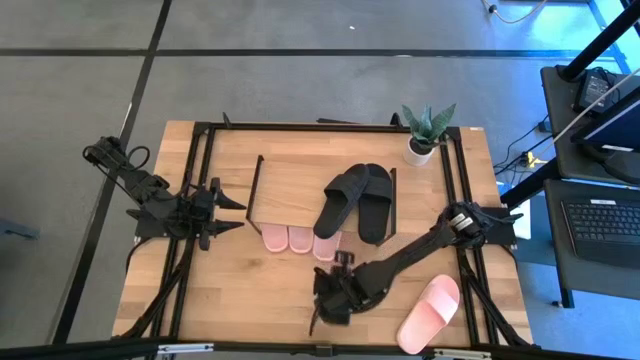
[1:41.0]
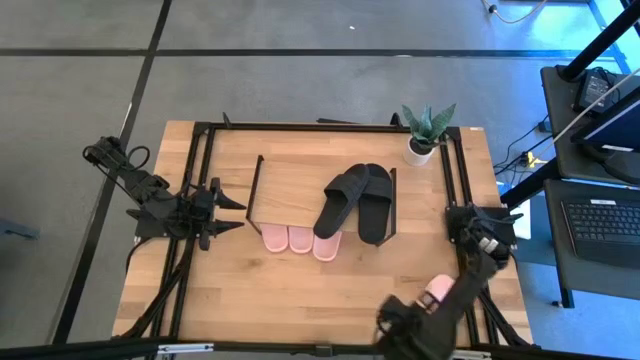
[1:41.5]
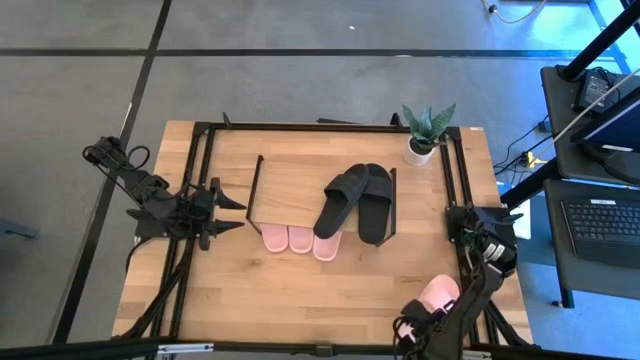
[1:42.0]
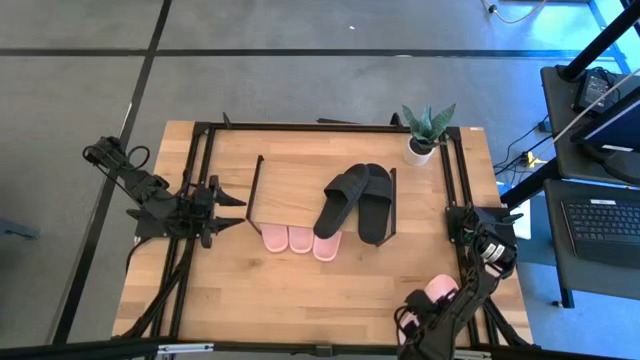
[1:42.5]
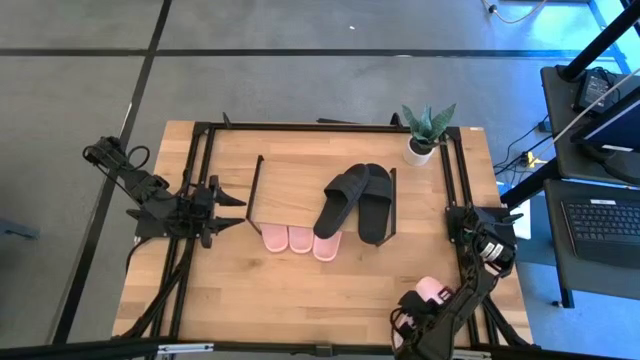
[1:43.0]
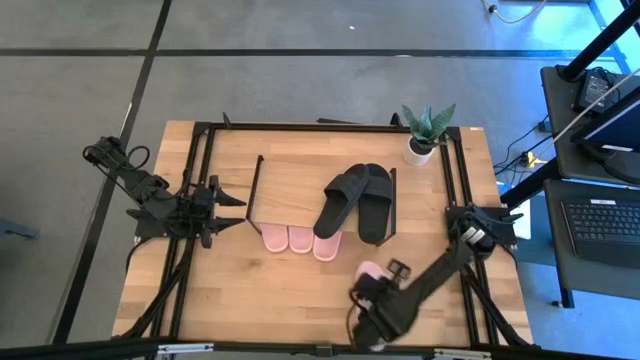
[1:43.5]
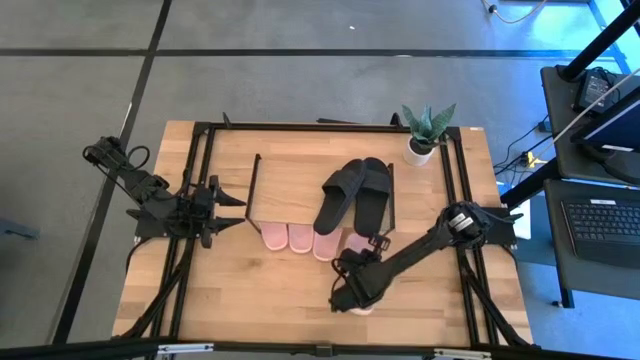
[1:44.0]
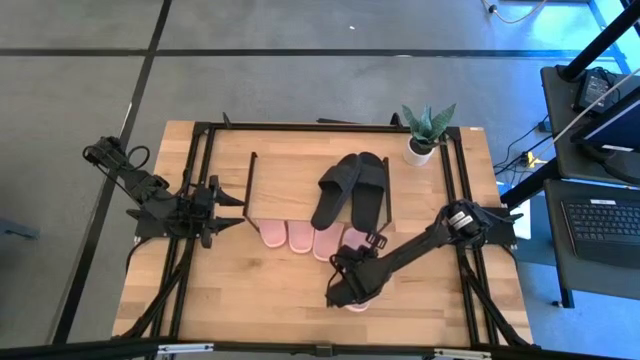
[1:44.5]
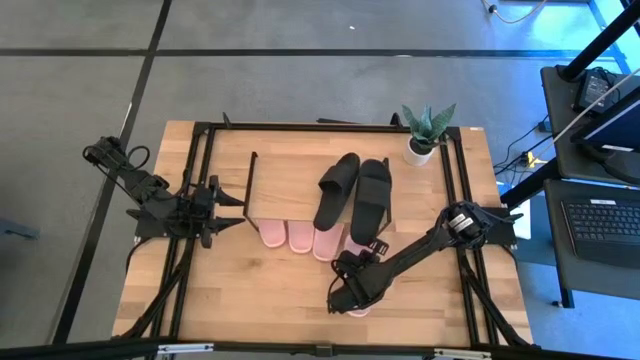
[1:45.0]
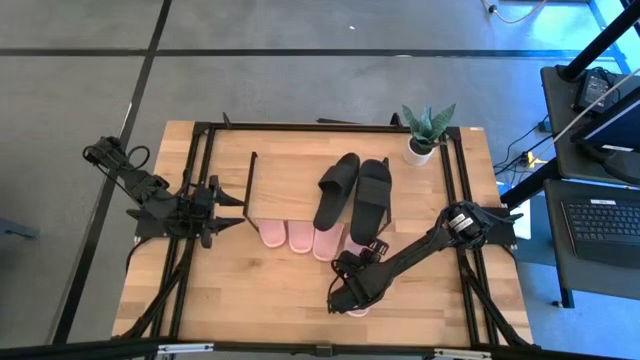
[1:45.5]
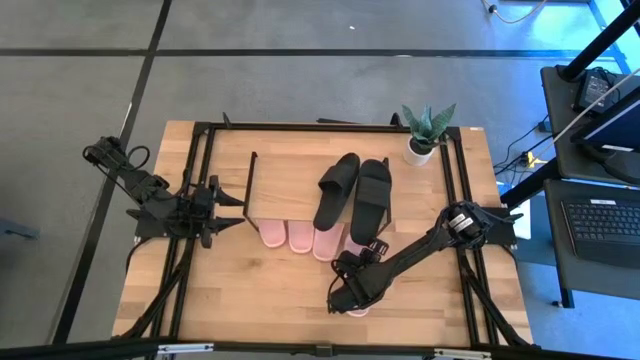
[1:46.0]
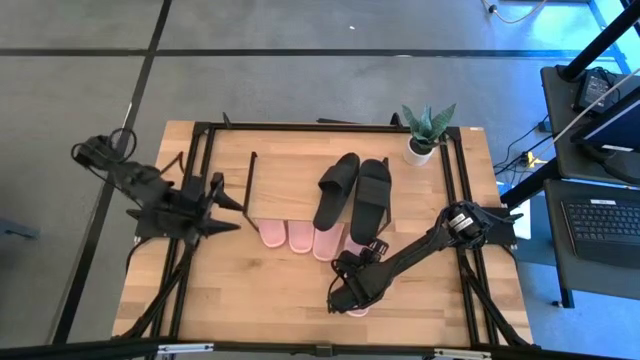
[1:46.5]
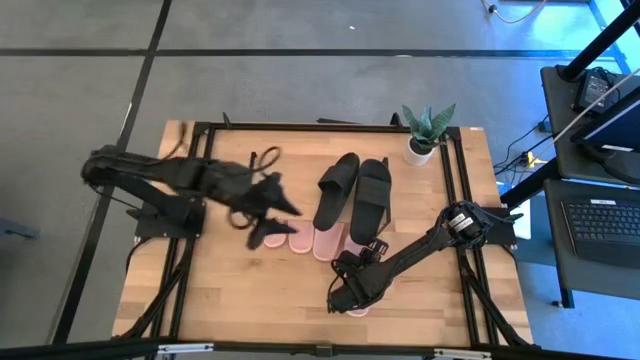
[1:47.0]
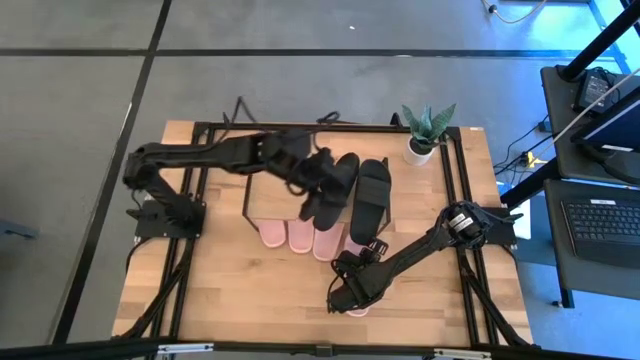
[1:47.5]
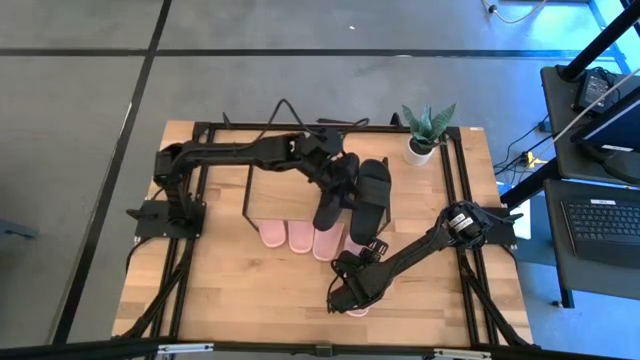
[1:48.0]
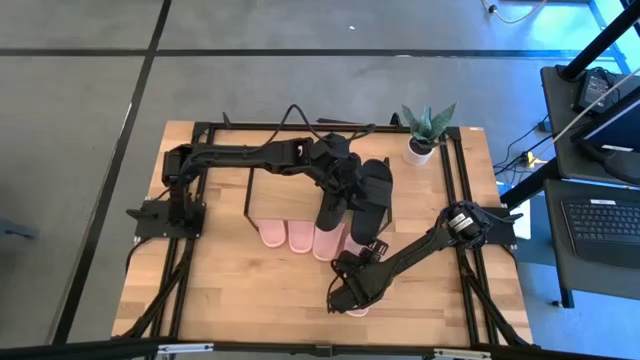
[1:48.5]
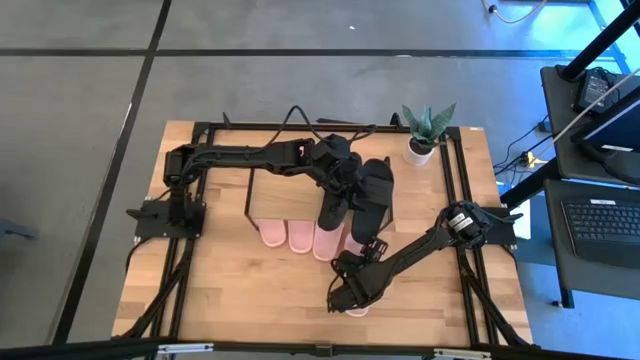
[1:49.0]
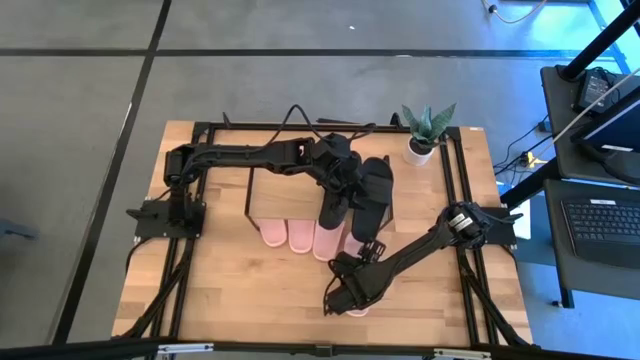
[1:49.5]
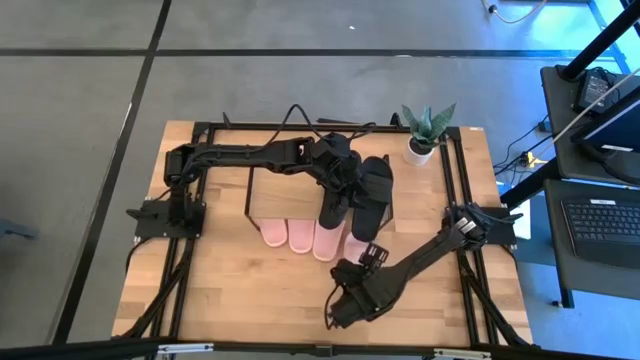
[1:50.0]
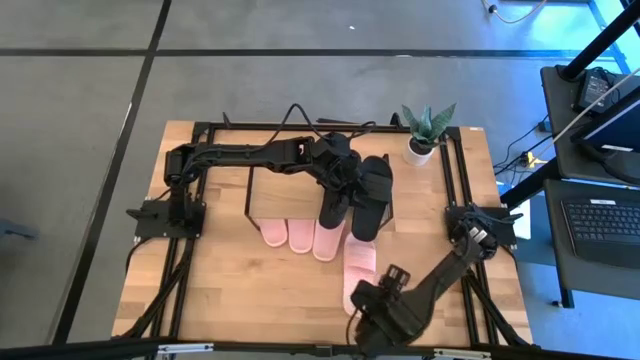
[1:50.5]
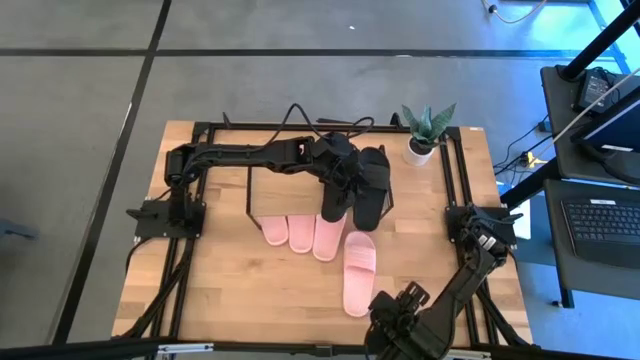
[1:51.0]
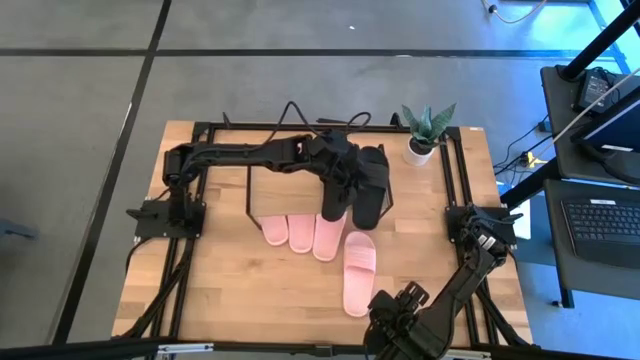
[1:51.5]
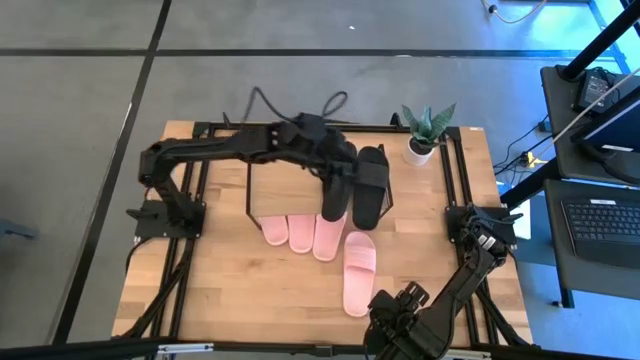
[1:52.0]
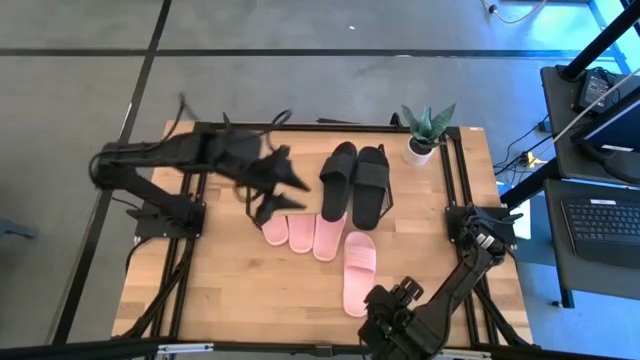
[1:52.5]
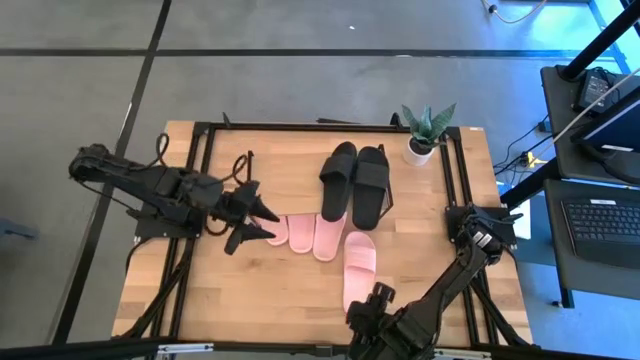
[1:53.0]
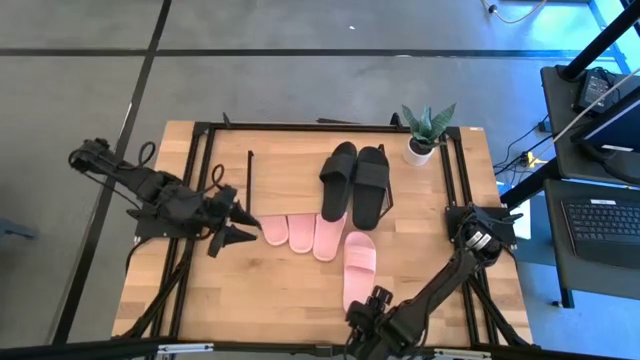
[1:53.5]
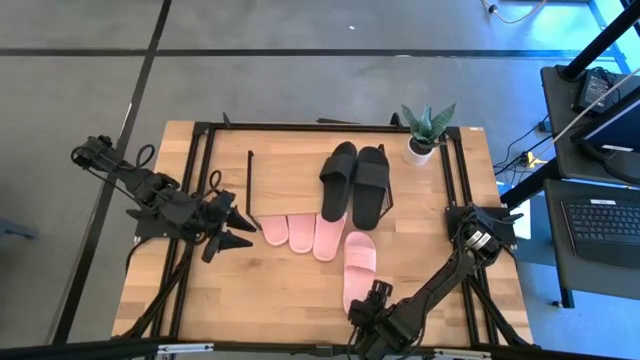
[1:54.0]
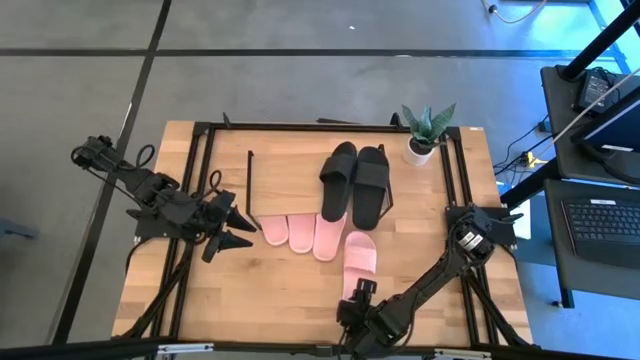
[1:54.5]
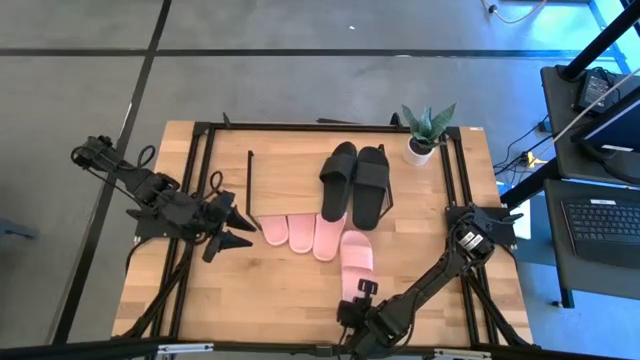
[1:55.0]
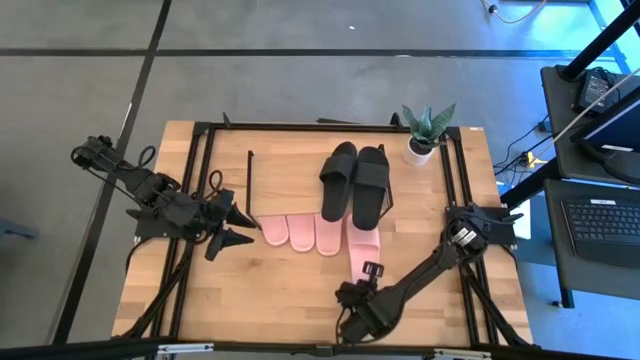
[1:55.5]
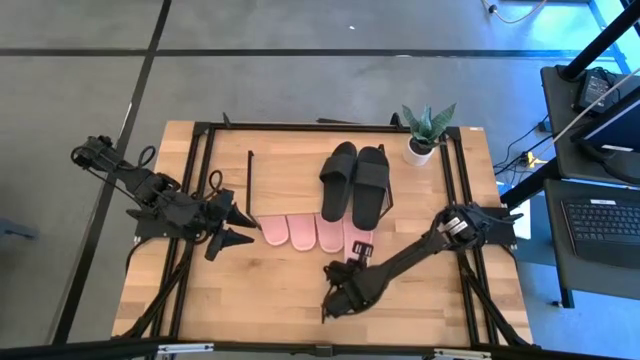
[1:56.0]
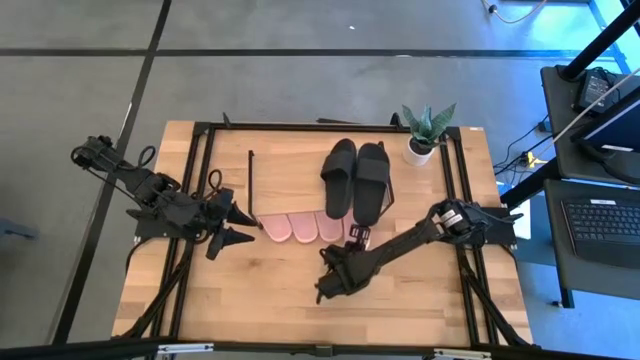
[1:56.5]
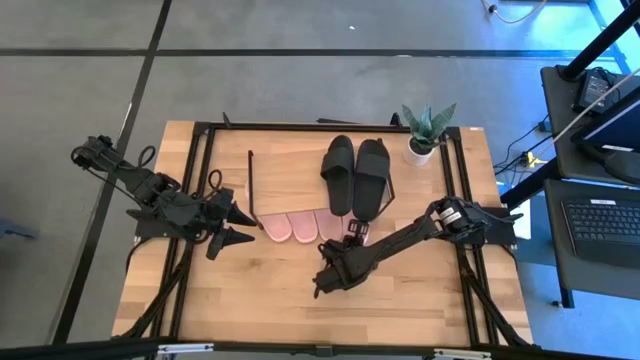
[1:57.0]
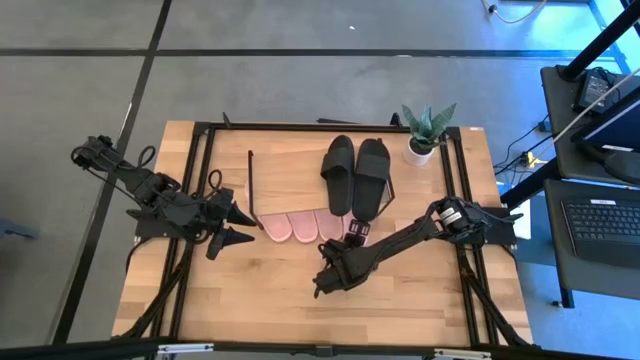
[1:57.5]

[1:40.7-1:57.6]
Task: Pick and place slides into the shelf
Put the pink slides under the shelf

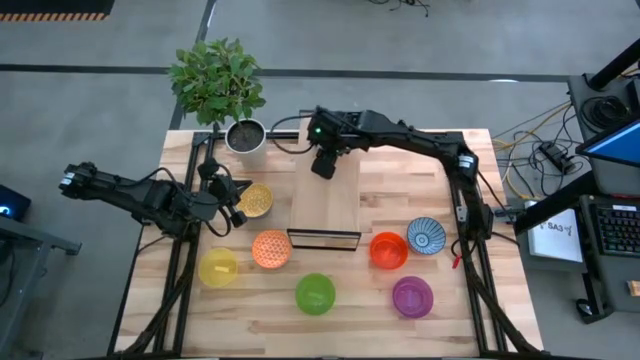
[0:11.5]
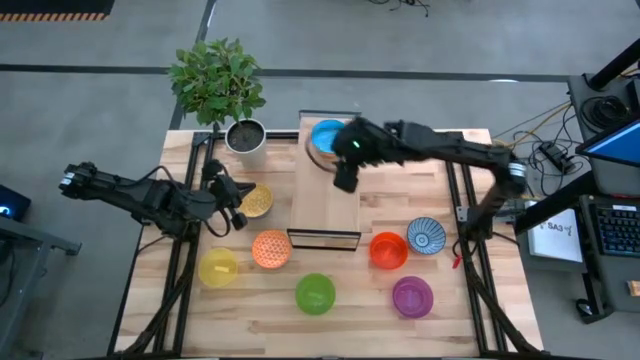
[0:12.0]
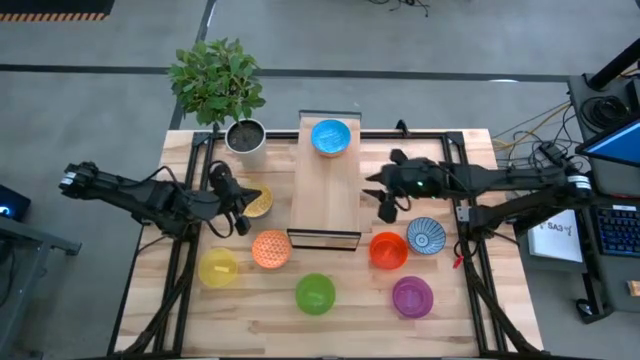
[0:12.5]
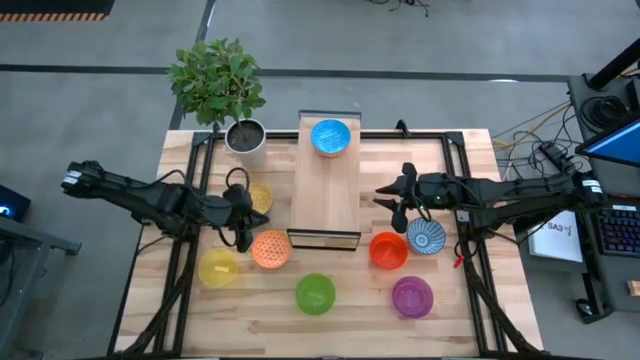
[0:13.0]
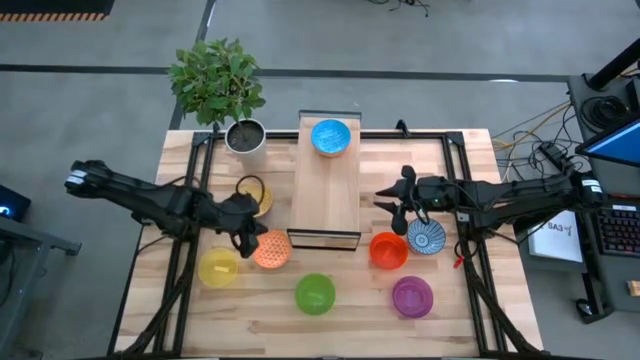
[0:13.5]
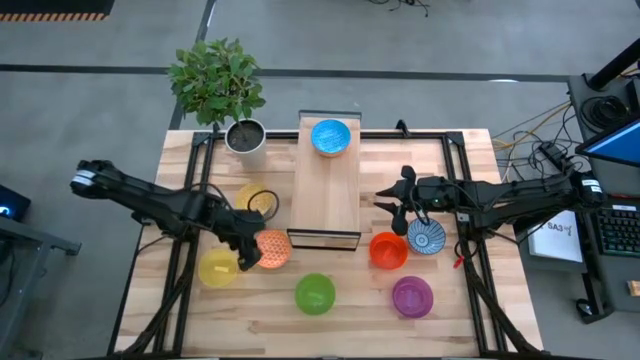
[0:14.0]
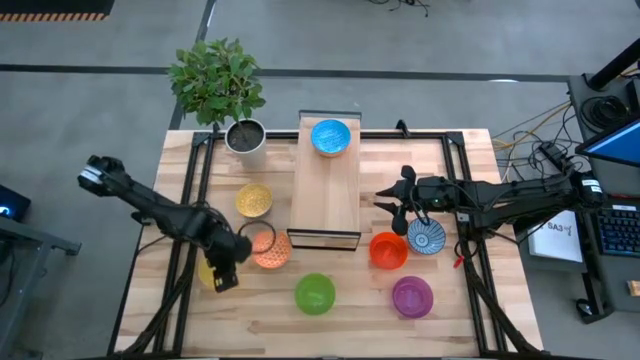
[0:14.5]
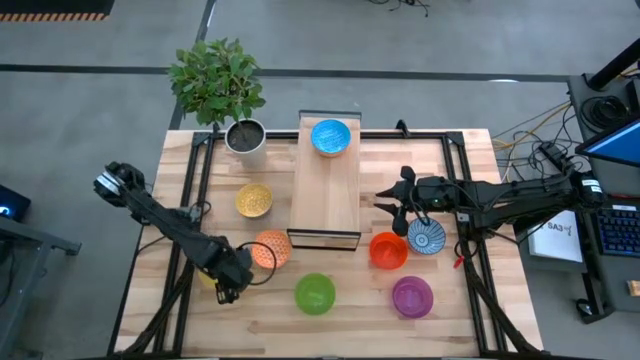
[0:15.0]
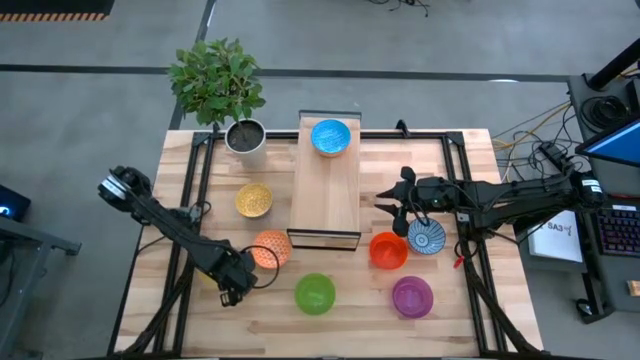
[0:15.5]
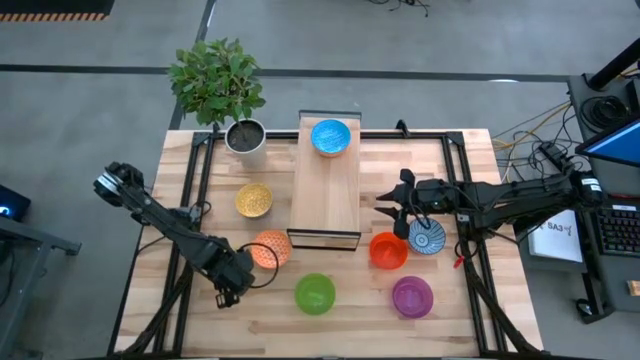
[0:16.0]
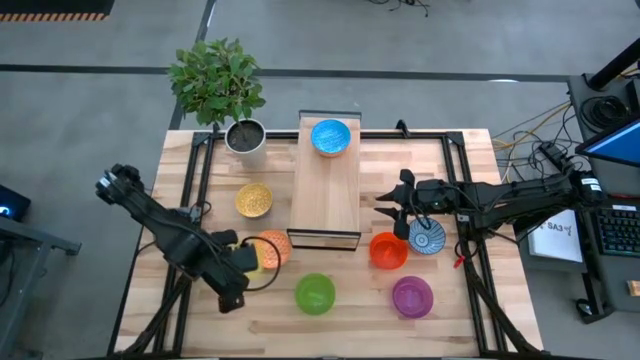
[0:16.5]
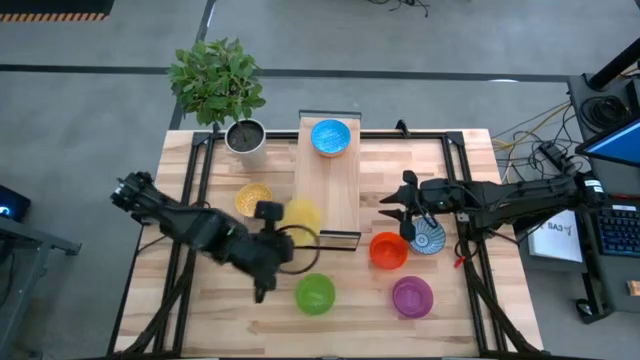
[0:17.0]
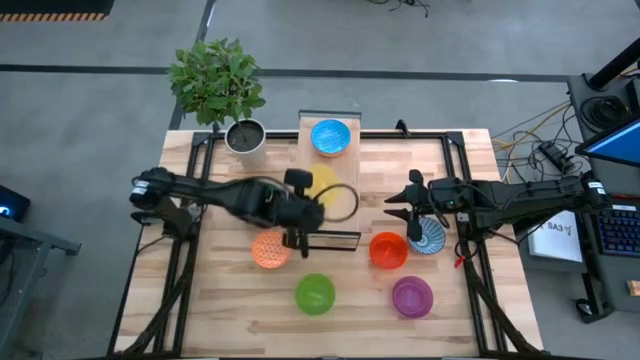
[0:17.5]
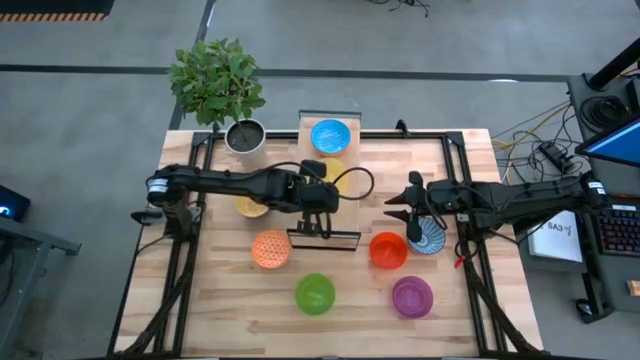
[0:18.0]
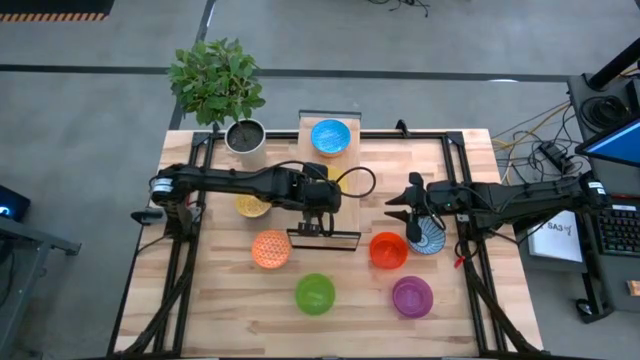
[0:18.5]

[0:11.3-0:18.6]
Task: Place and stack bowls onto a shelf
Put the yellow bowl on the shelf
